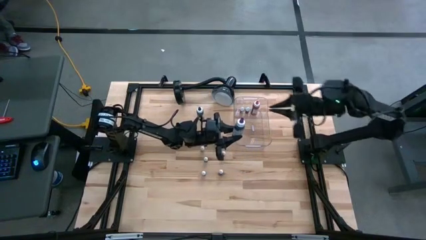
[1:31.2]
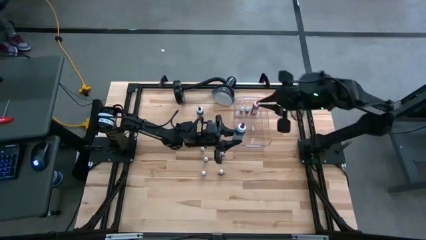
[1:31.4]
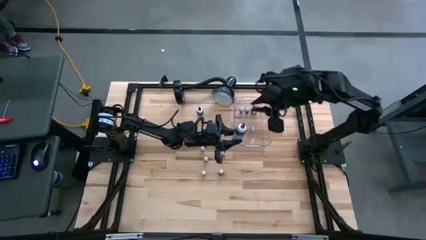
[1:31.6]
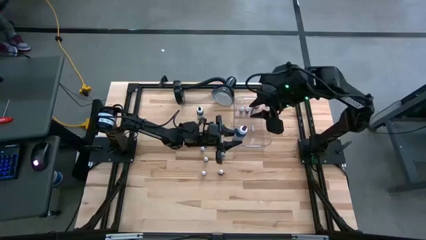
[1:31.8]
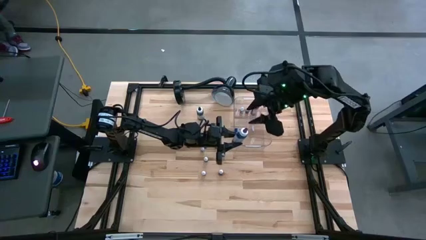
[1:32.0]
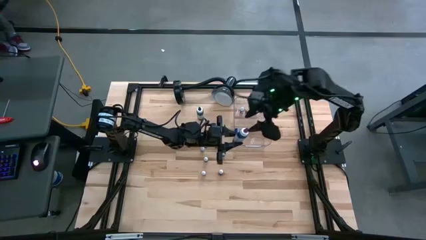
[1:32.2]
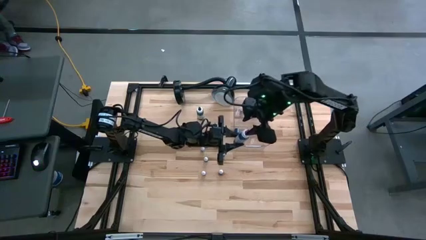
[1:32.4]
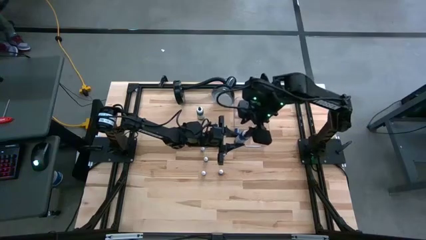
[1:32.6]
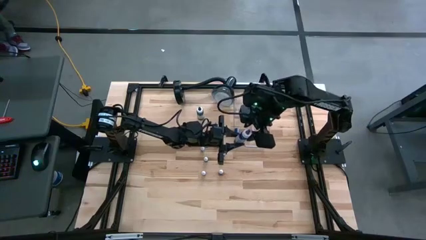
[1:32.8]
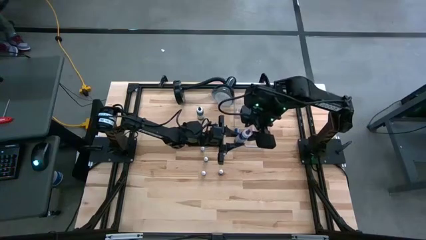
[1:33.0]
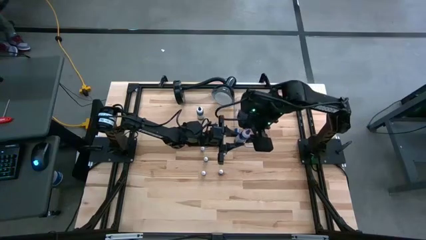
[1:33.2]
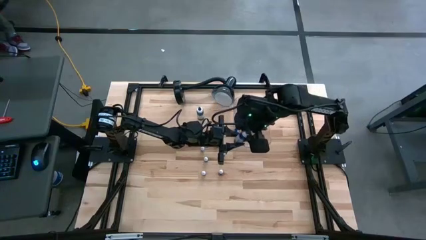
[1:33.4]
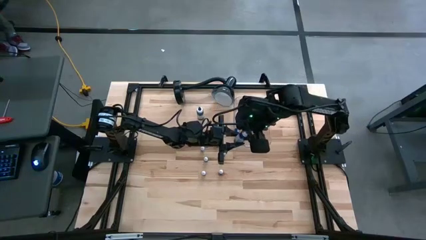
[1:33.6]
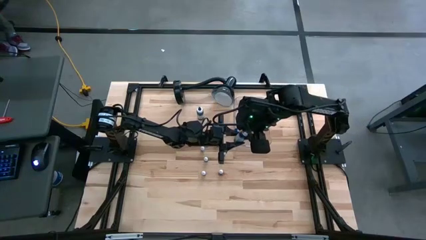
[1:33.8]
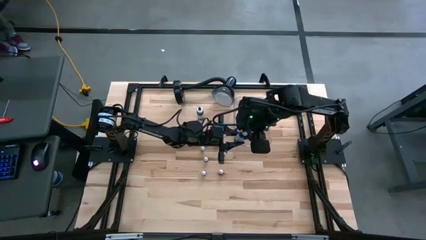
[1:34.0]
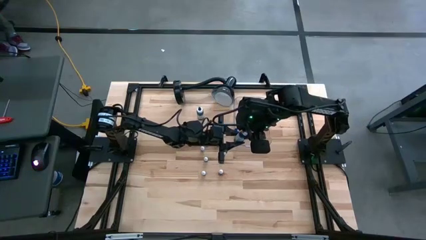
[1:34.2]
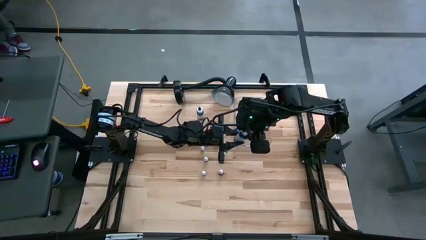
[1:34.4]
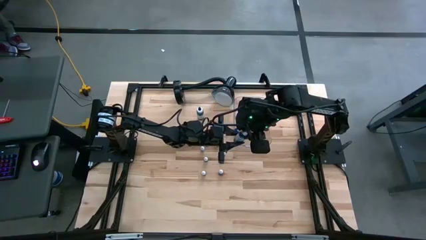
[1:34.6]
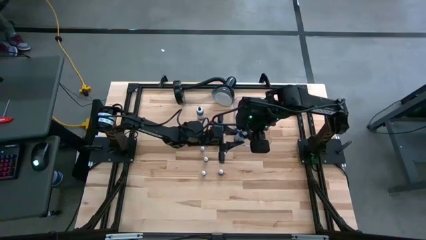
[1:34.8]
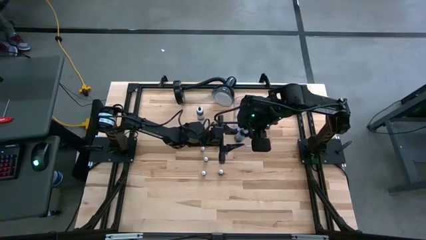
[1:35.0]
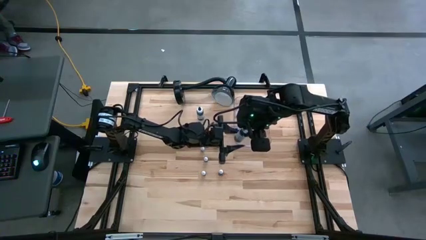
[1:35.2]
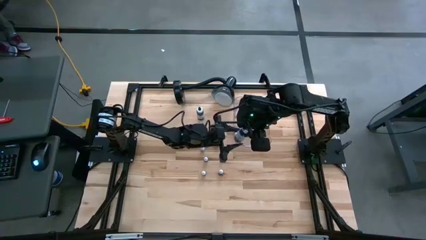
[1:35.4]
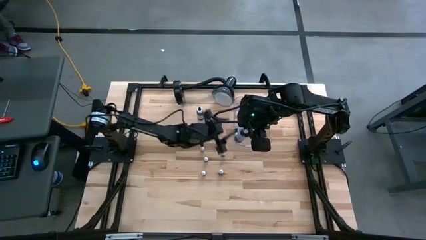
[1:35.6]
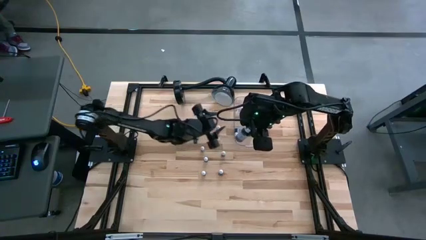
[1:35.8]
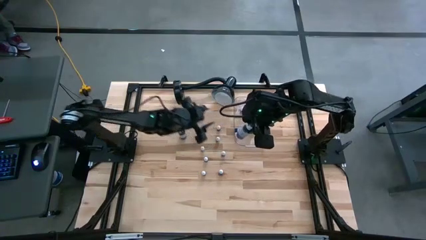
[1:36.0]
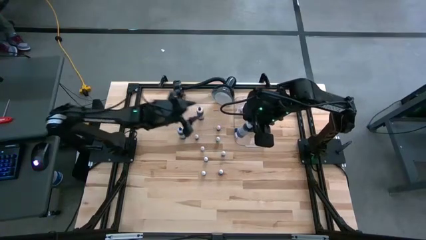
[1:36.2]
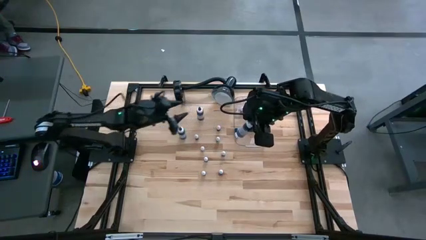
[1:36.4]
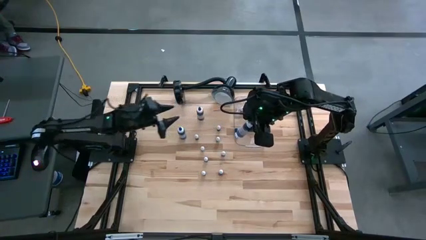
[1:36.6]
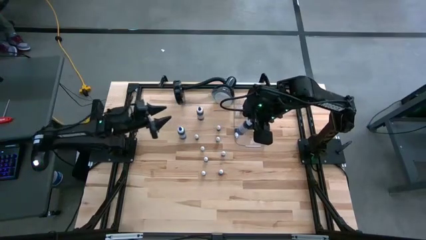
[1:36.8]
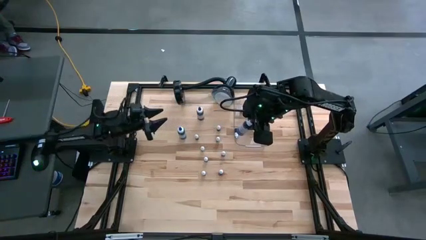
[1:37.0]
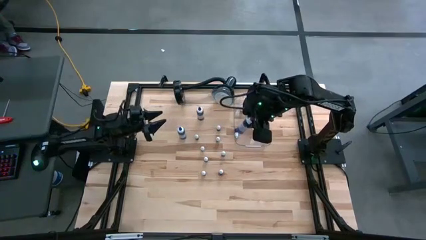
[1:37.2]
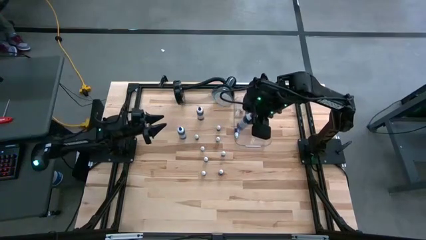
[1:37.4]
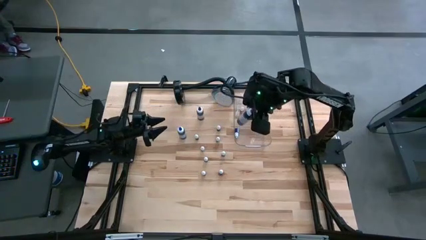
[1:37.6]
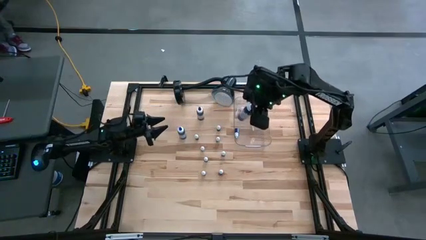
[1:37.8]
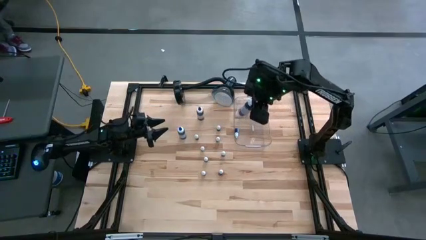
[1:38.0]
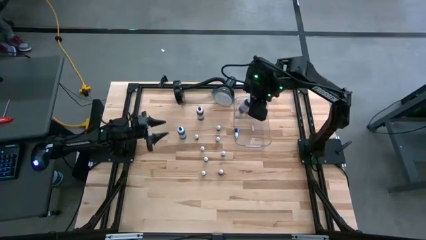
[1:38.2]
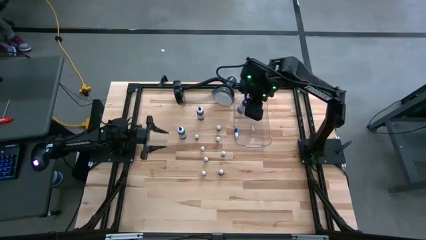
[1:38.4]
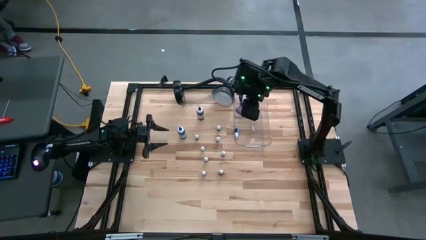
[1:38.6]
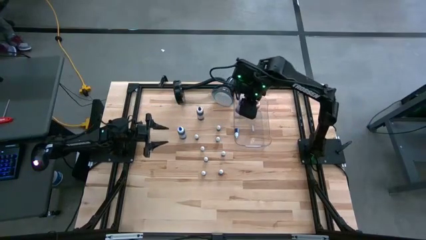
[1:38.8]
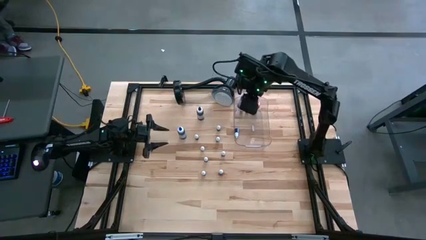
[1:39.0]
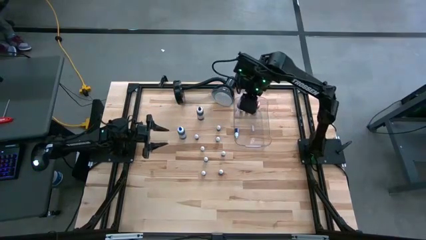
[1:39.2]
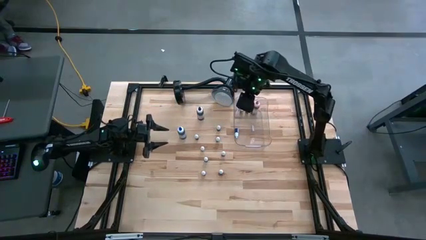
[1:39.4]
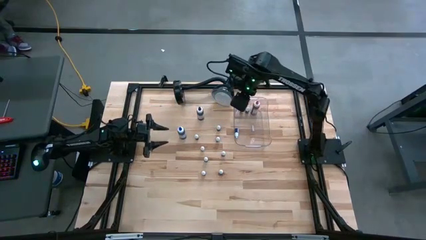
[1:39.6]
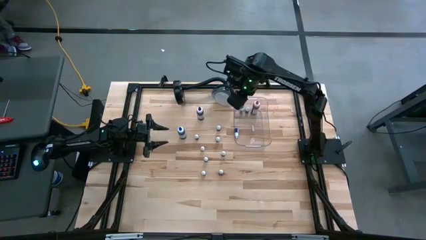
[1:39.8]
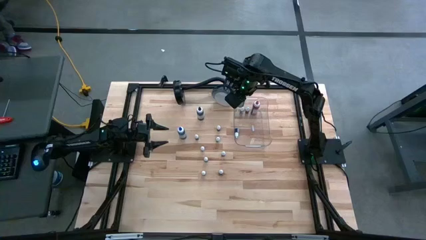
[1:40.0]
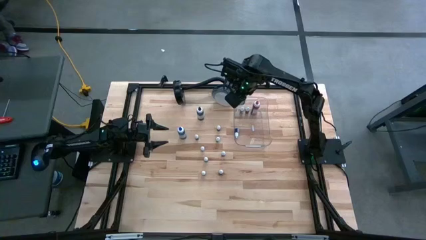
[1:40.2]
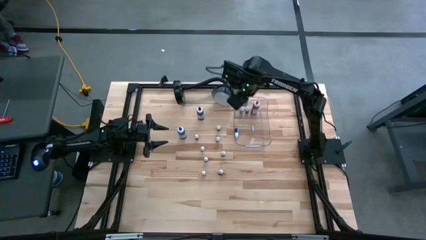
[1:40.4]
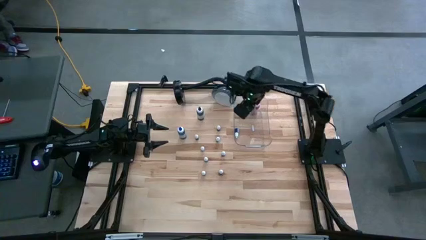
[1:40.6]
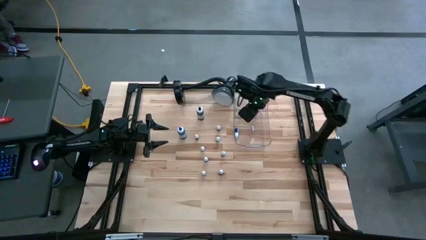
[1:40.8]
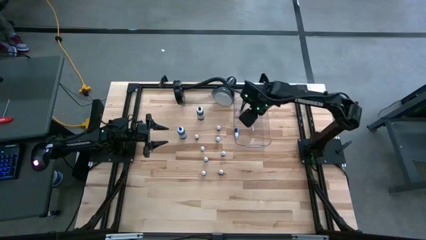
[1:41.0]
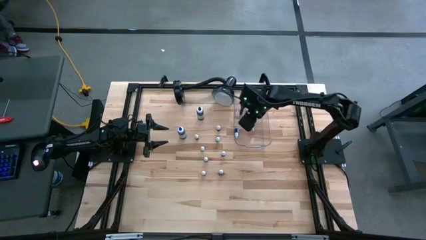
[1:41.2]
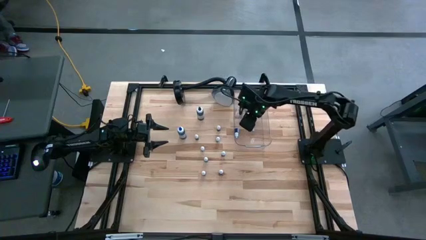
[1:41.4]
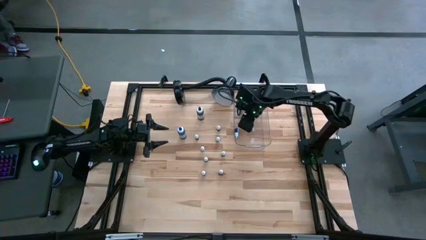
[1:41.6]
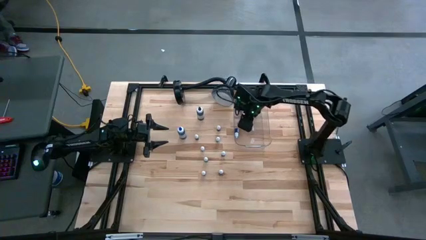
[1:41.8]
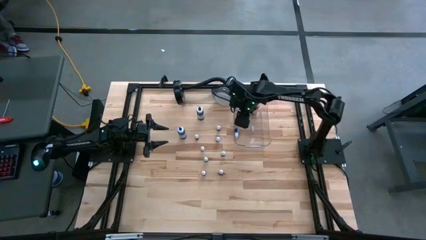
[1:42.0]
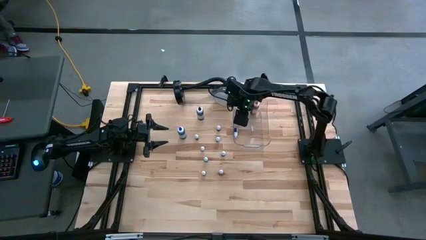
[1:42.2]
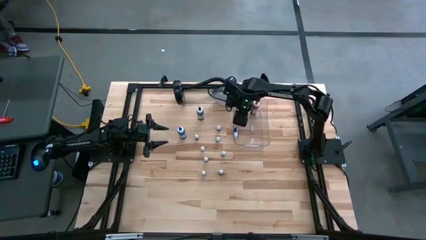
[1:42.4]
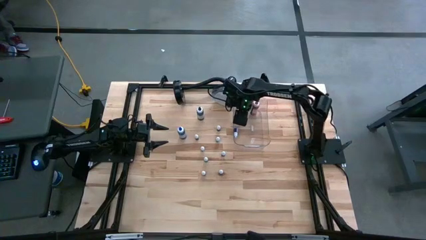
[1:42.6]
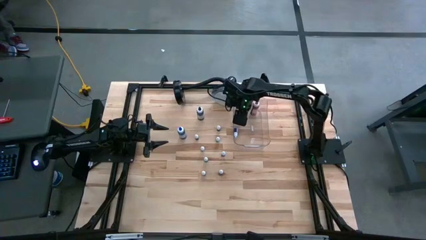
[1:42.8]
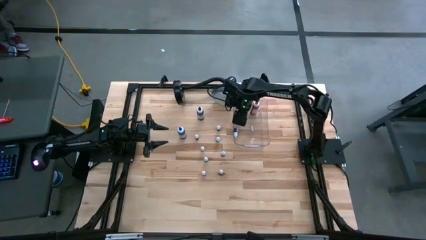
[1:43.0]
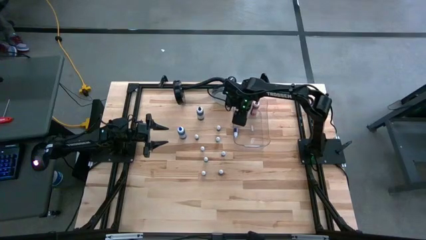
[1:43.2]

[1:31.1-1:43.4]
Task: Pick & Place food coloring
Put the big purple food coloring bottle into the transparent bin

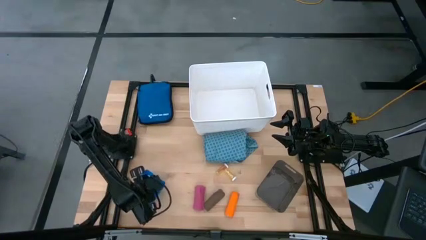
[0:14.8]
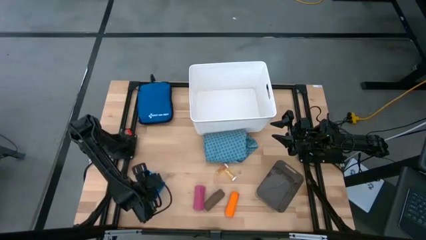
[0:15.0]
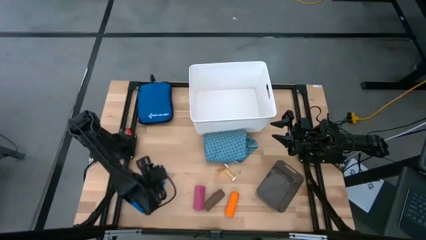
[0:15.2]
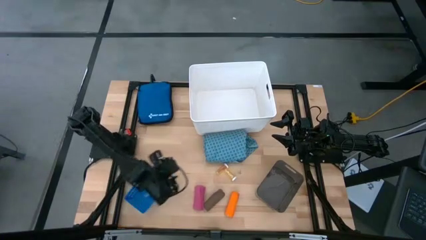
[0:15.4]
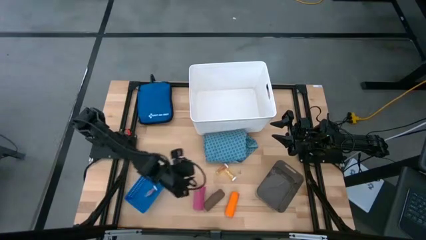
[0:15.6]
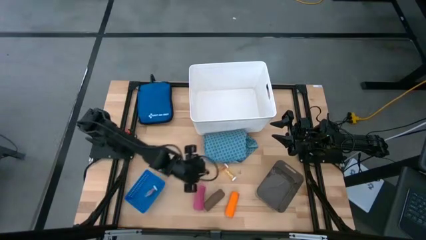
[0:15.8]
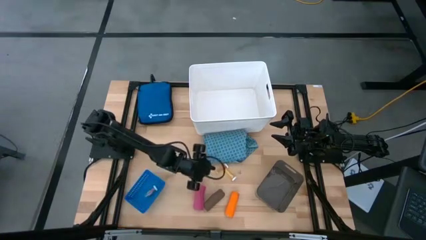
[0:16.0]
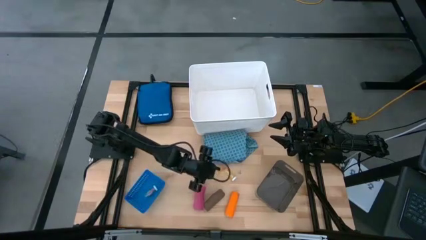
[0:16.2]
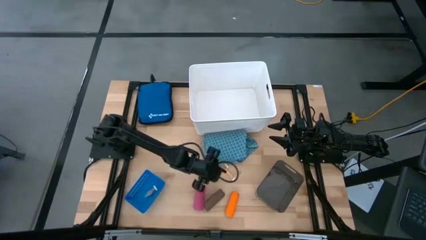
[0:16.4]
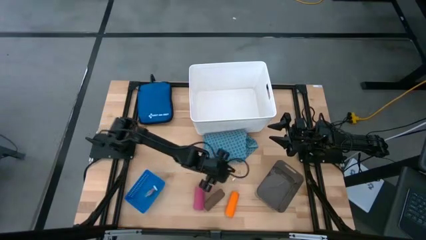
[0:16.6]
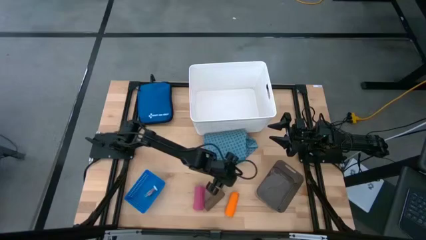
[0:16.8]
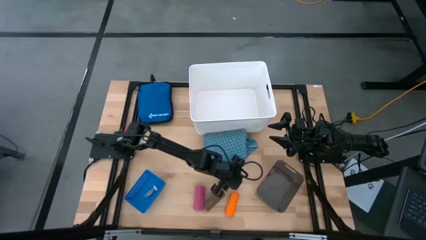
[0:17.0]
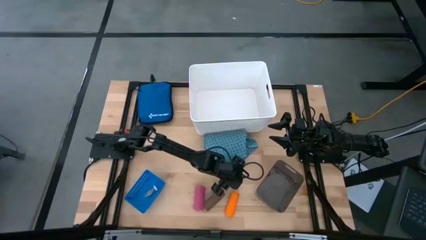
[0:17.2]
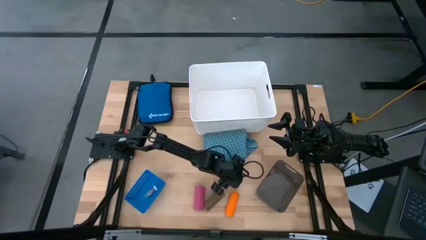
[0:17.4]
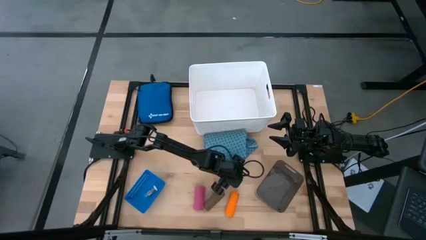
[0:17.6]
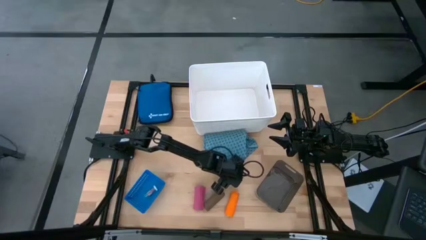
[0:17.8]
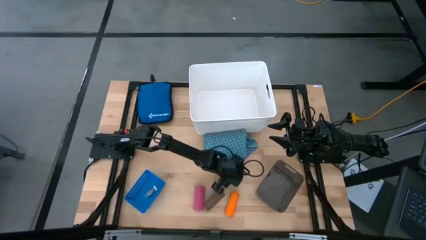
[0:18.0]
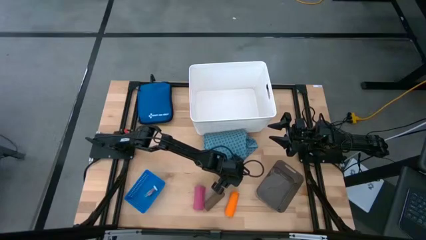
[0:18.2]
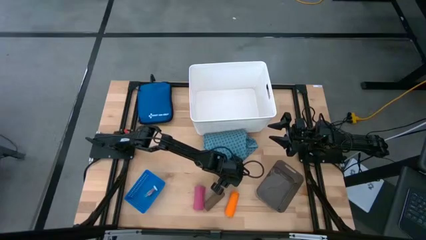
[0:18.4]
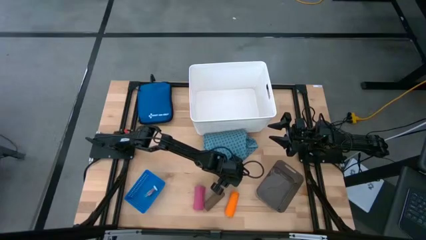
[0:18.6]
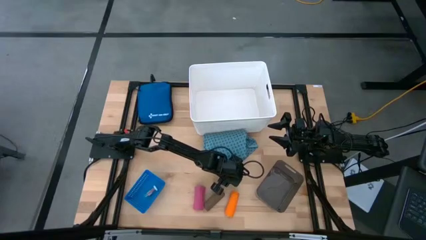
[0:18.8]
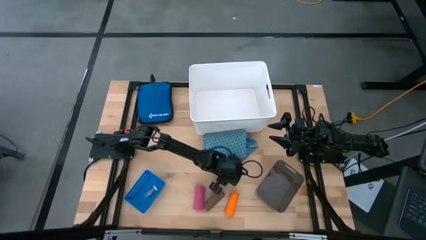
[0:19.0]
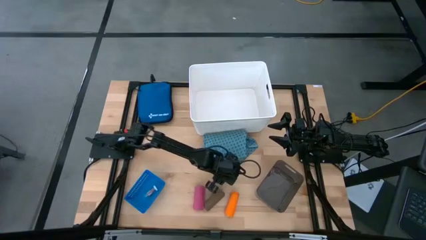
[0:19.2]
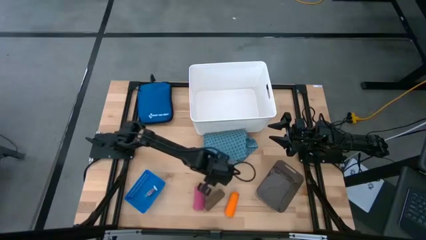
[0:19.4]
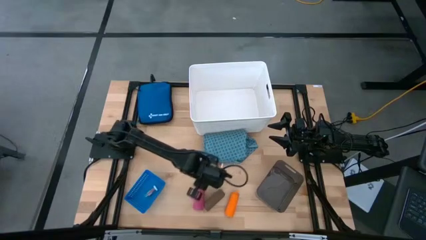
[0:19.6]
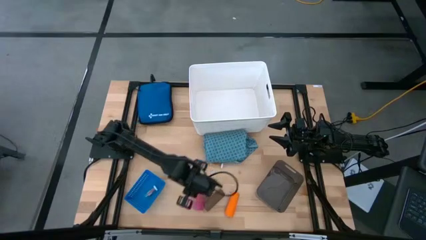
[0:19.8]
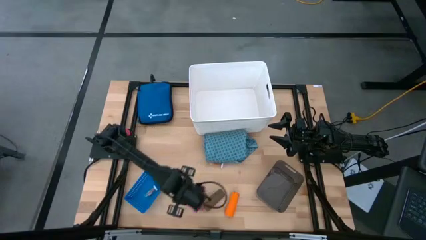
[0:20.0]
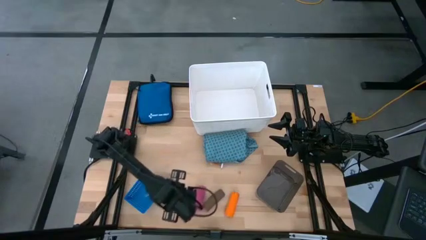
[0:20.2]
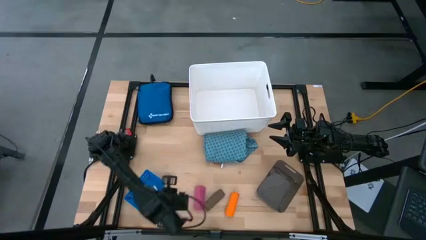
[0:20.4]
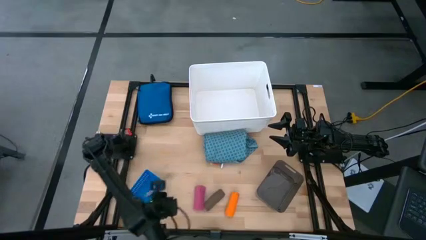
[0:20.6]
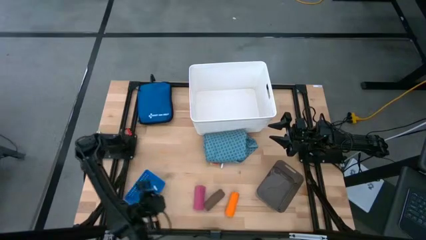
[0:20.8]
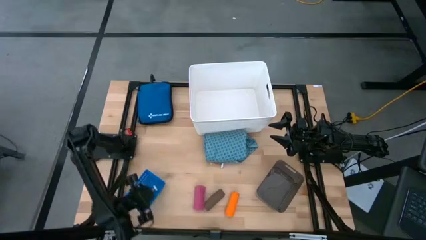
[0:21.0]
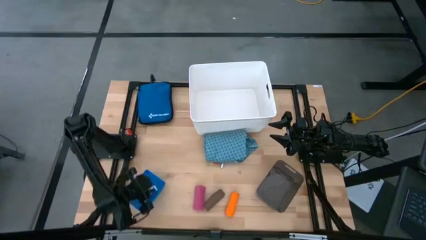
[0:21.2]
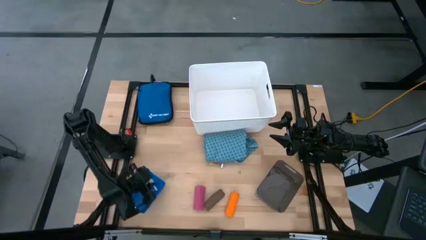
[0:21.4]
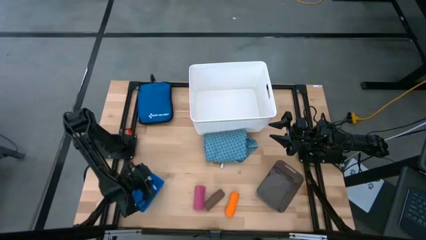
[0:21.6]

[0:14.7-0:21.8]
Task: Pick & Place Medicine items
Put the yellow pill bottle into the blue basket
